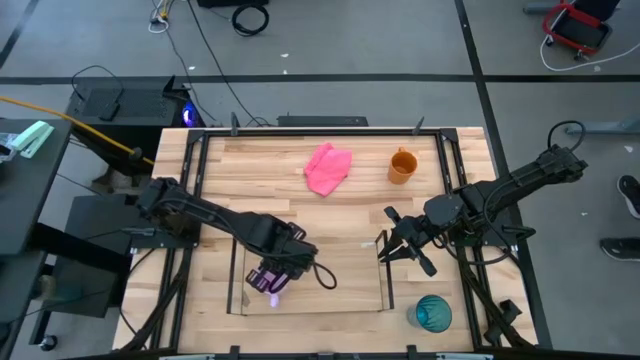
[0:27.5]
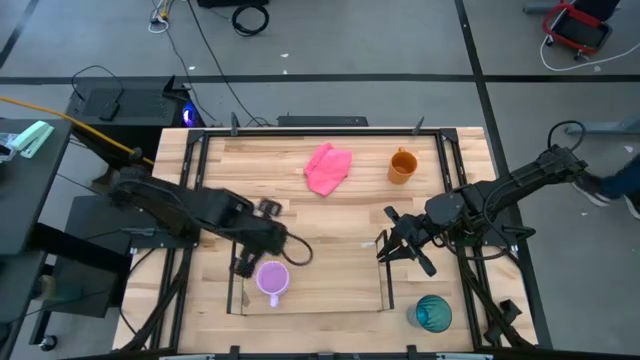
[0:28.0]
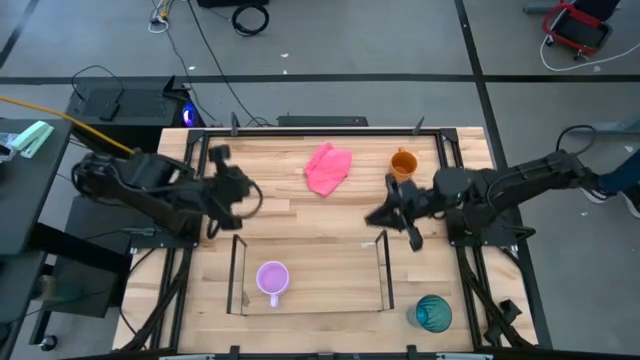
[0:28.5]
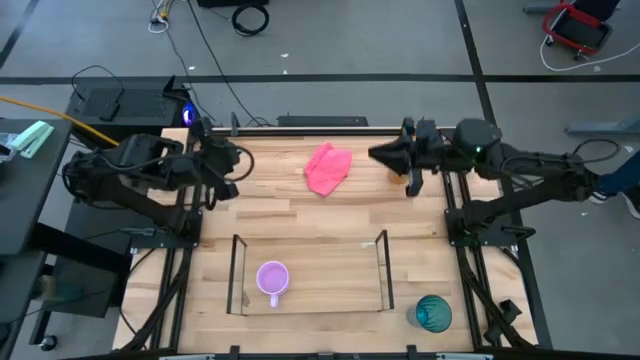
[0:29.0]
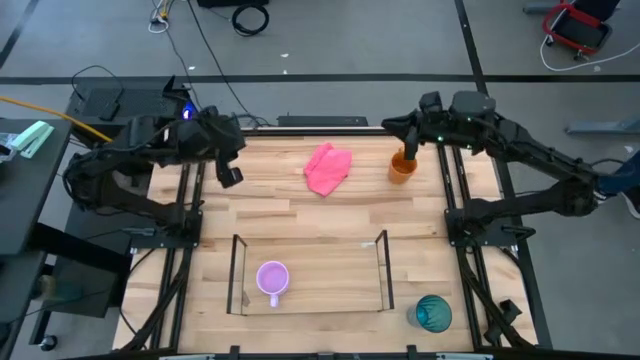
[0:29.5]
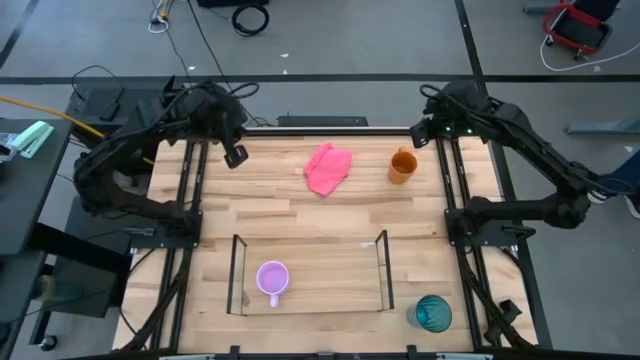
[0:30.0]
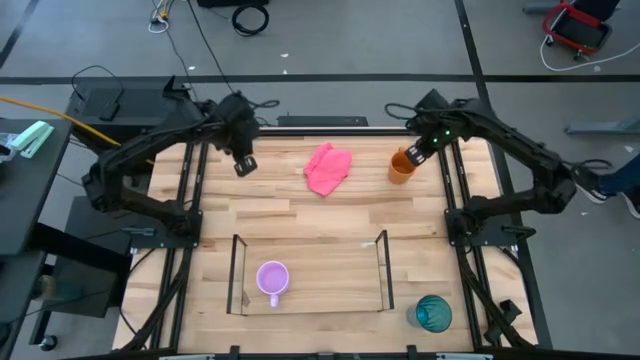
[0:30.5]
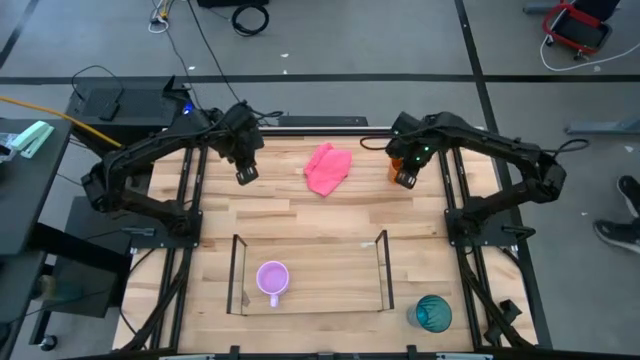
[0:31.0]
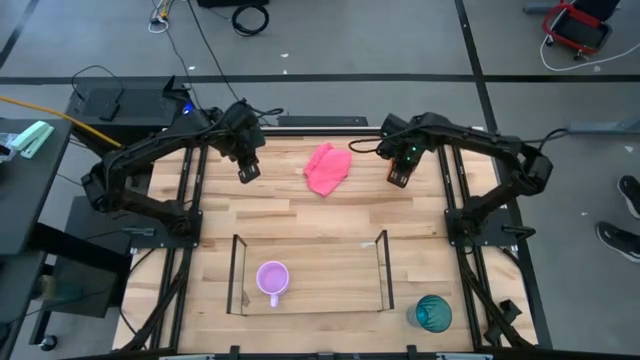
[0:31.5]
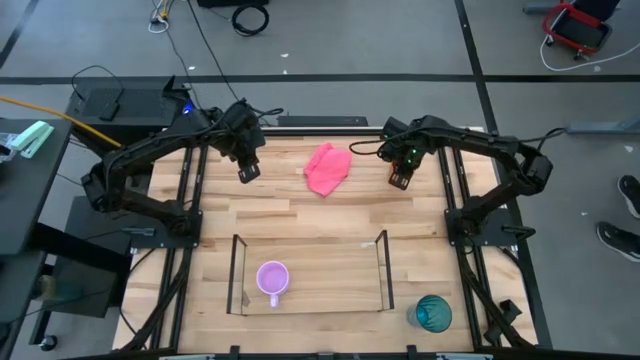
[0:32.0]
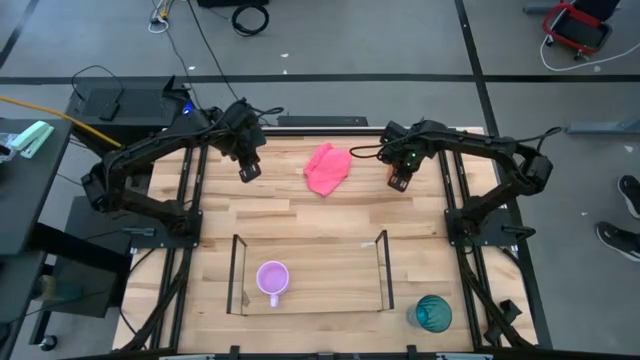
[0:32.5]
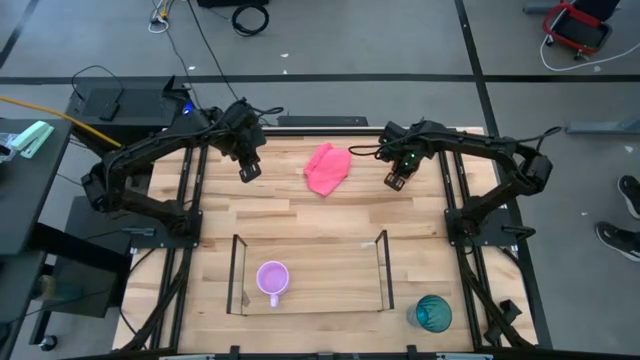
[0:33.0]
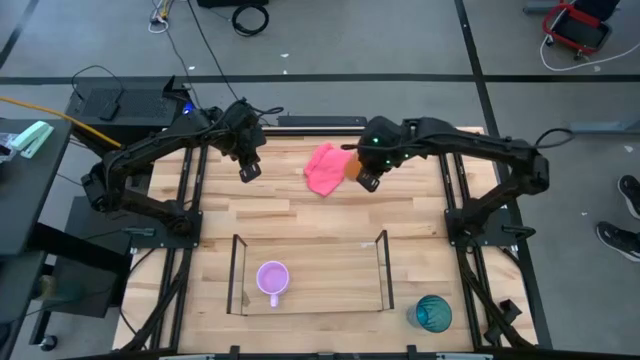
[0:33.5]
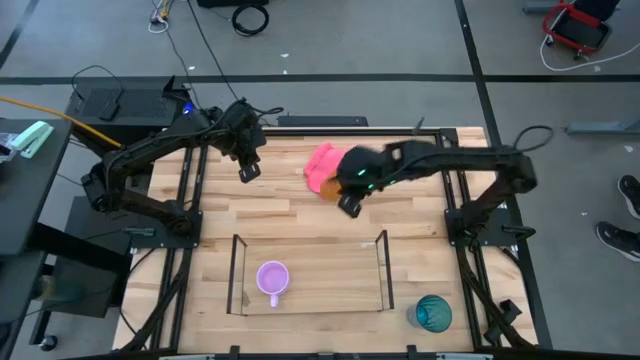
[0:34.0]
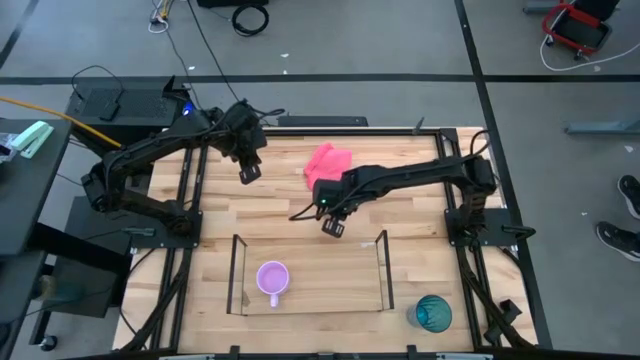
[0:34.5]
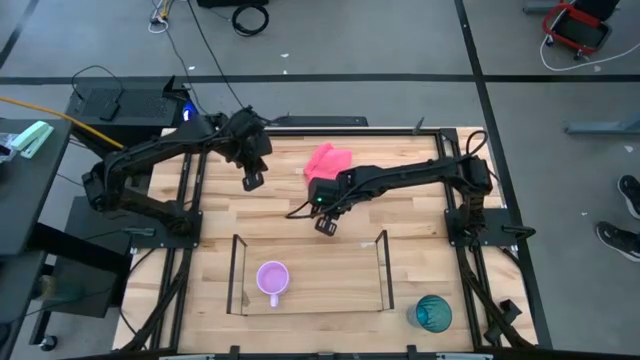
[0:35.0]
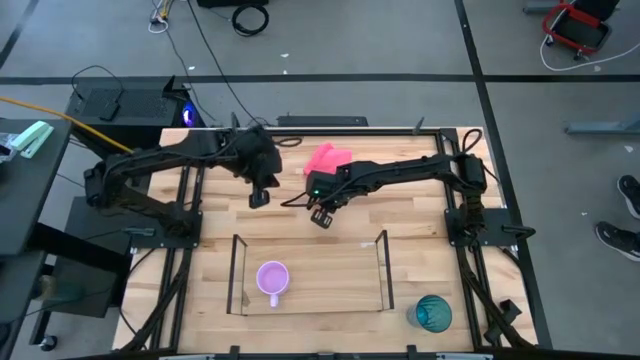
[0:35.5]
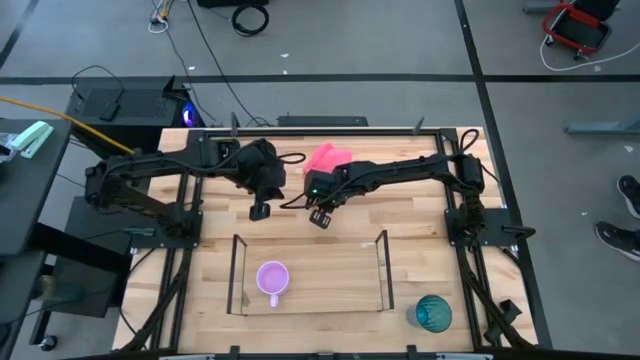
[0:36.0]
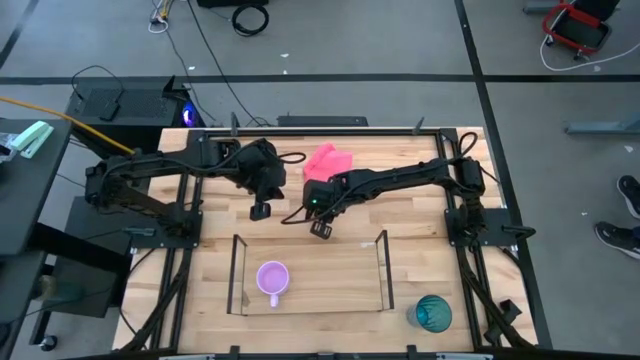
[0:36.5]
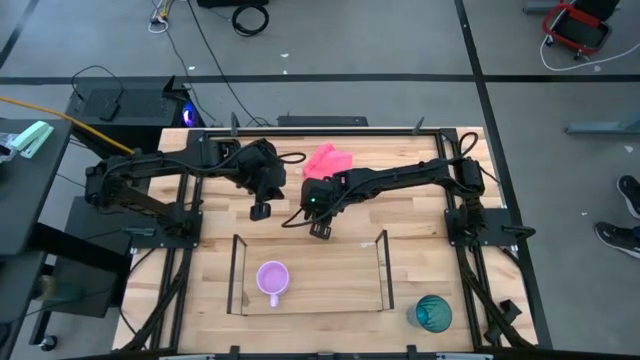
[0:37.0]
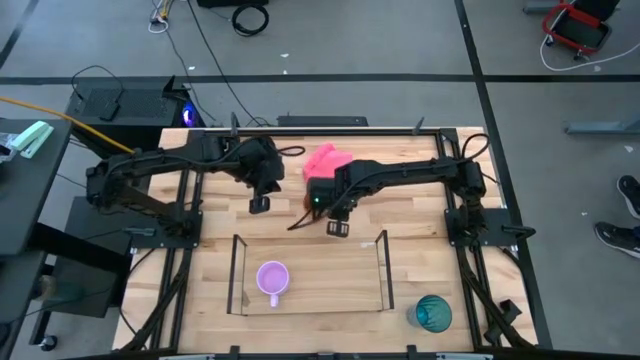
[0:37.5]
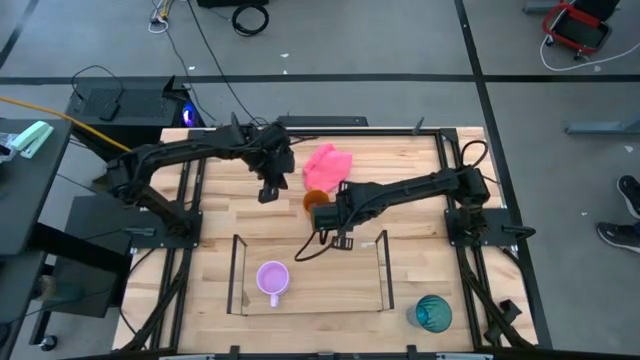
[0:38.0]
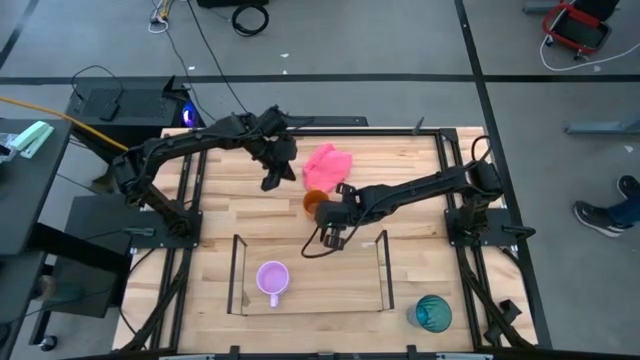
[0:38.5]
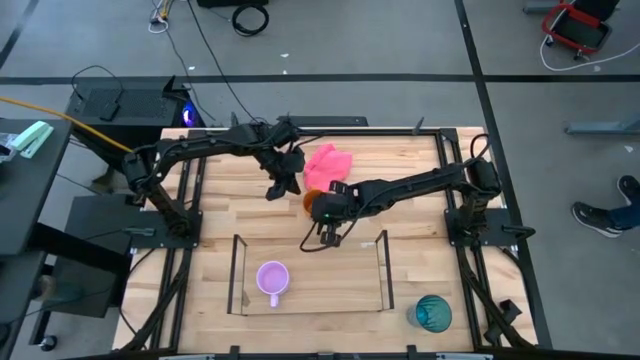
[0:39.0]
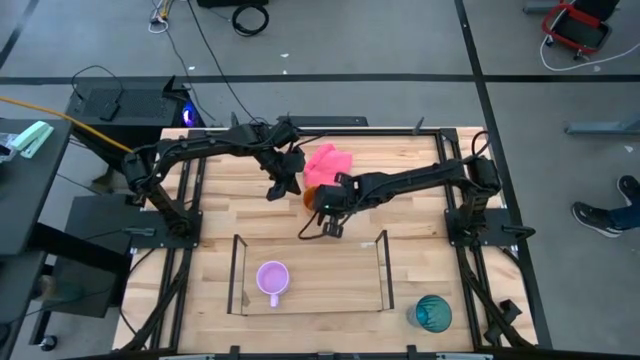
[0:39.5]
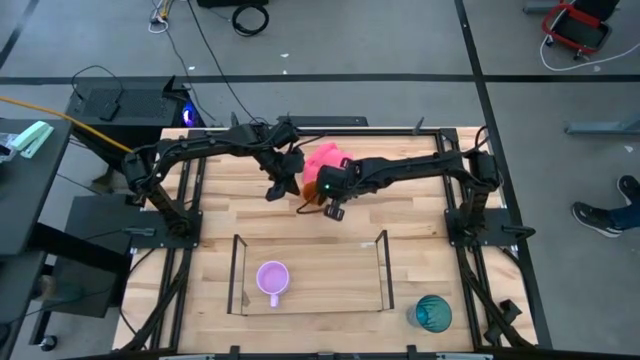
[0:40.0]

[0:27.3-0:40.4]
Task: Stack small to large cups/mugs on shelf
Put the orange mug on the shelf
